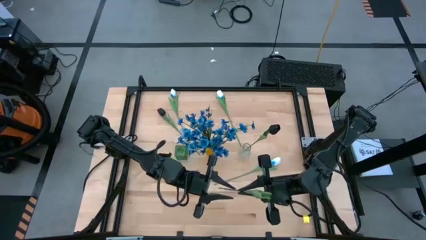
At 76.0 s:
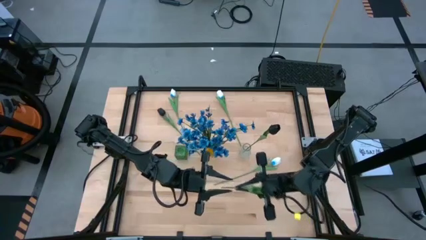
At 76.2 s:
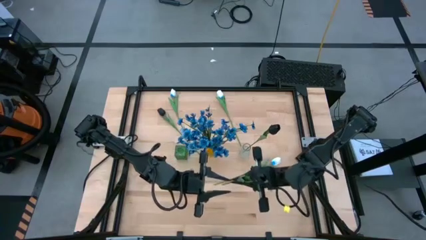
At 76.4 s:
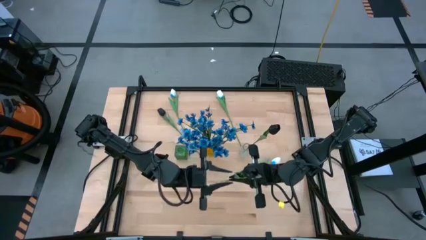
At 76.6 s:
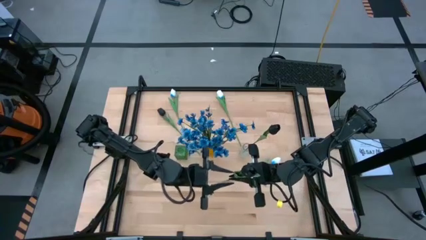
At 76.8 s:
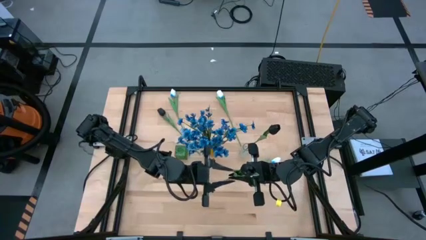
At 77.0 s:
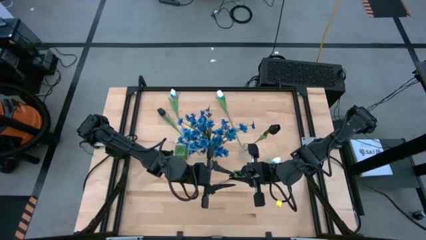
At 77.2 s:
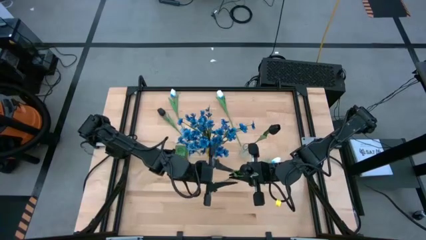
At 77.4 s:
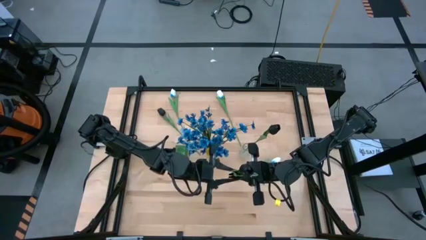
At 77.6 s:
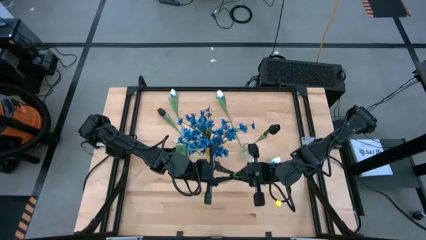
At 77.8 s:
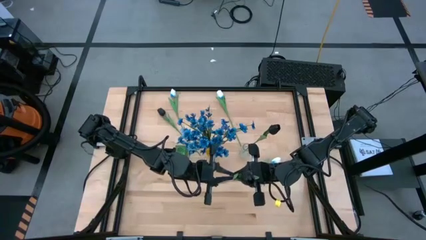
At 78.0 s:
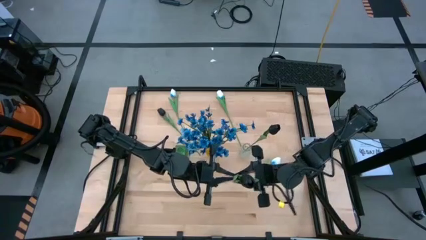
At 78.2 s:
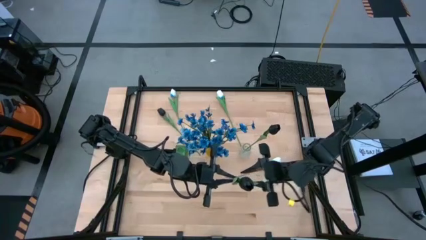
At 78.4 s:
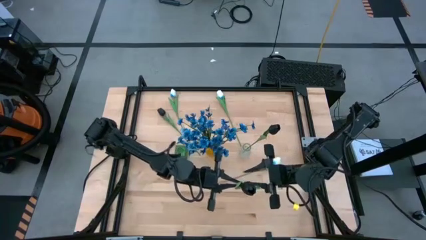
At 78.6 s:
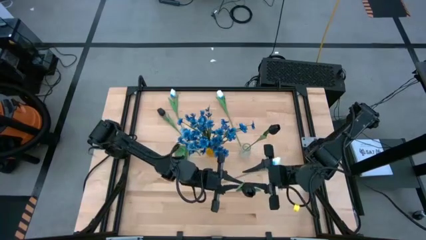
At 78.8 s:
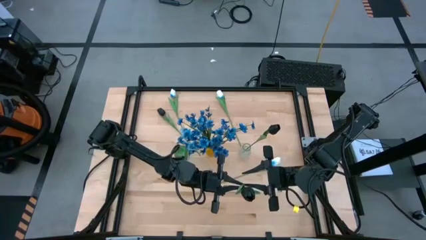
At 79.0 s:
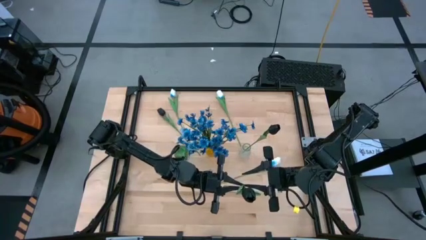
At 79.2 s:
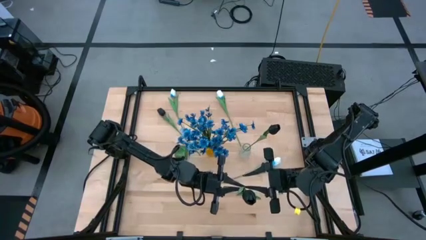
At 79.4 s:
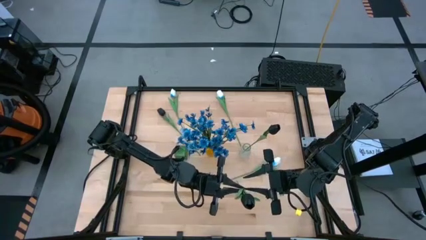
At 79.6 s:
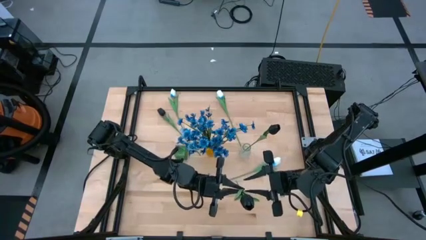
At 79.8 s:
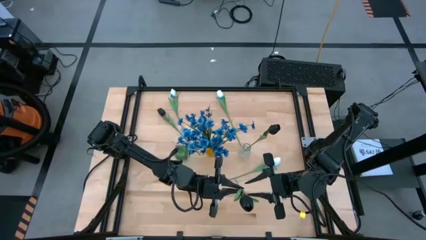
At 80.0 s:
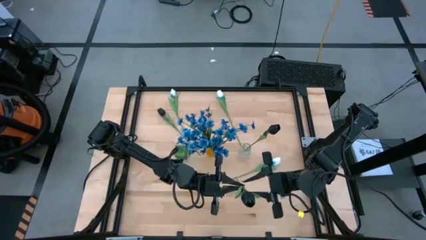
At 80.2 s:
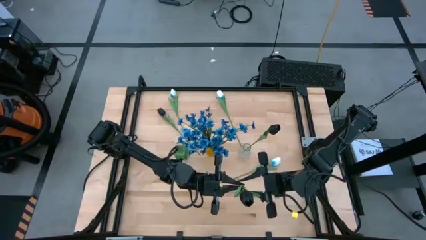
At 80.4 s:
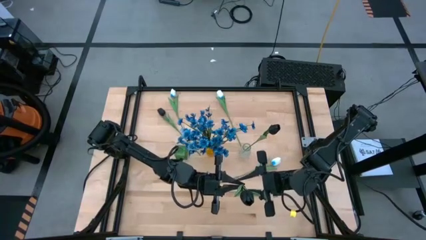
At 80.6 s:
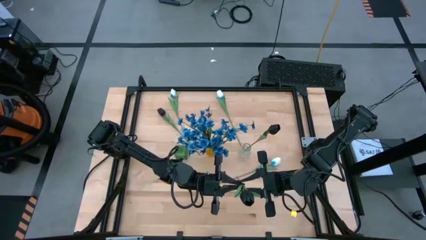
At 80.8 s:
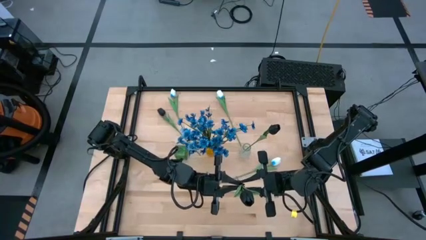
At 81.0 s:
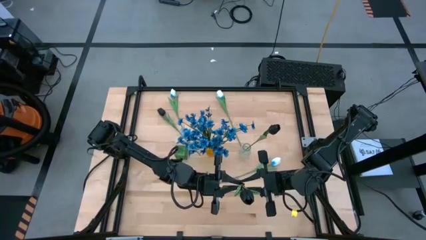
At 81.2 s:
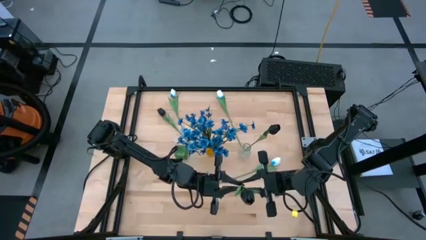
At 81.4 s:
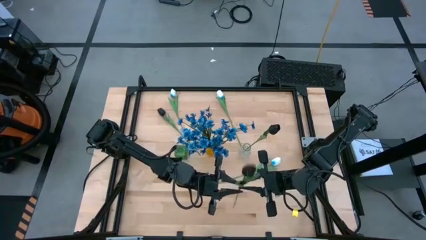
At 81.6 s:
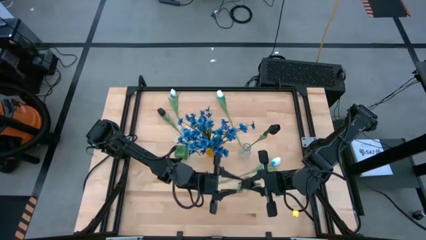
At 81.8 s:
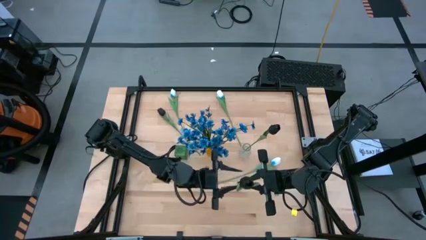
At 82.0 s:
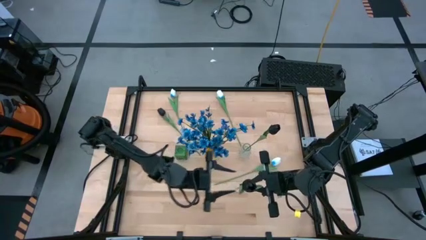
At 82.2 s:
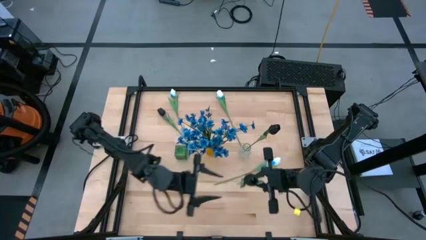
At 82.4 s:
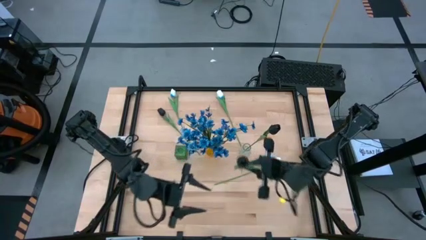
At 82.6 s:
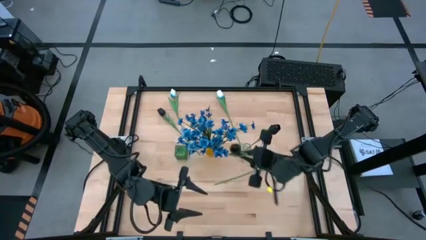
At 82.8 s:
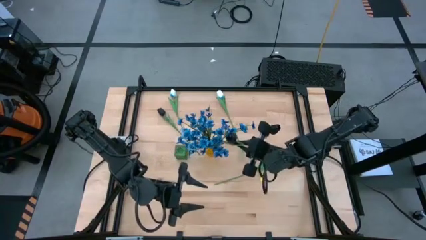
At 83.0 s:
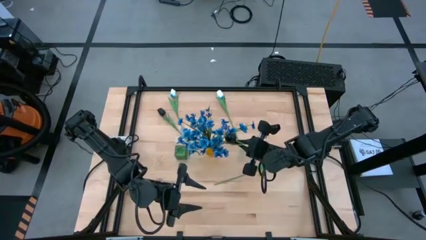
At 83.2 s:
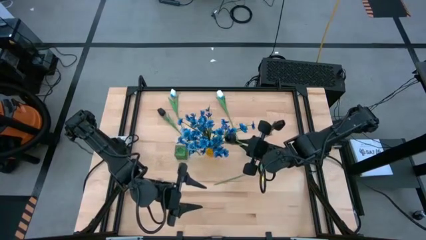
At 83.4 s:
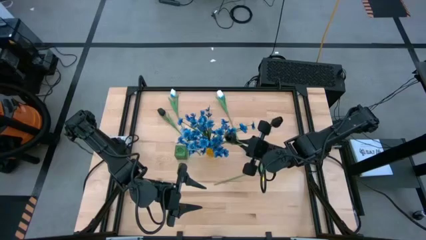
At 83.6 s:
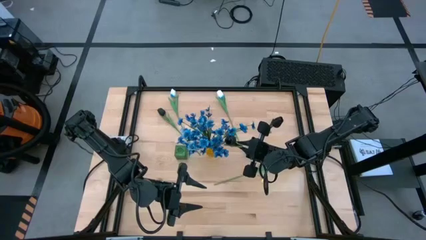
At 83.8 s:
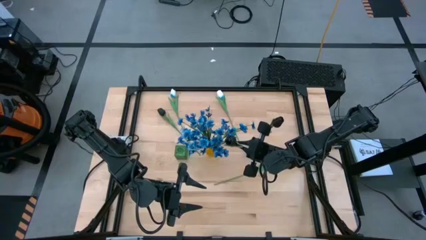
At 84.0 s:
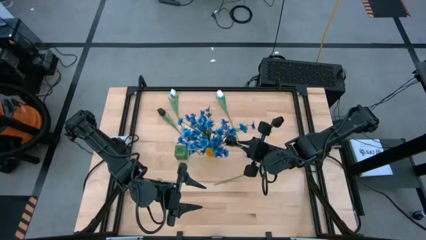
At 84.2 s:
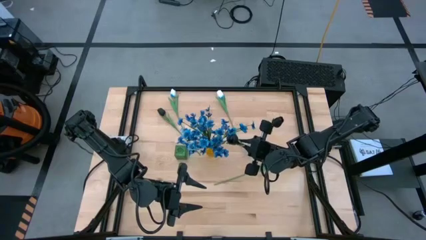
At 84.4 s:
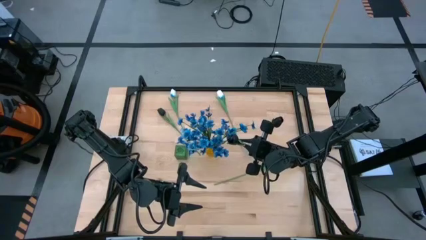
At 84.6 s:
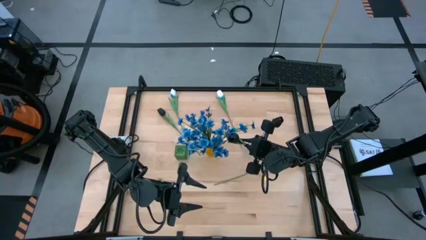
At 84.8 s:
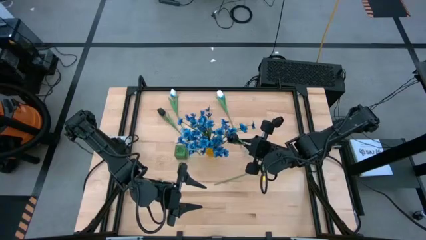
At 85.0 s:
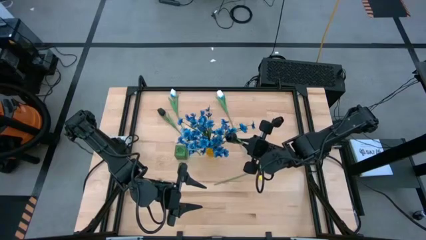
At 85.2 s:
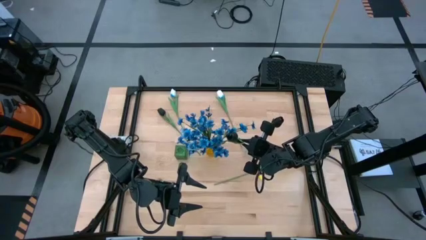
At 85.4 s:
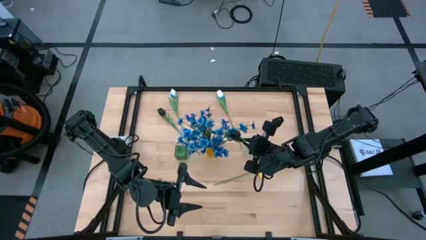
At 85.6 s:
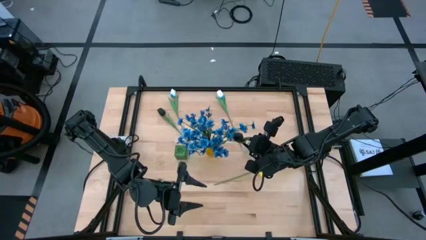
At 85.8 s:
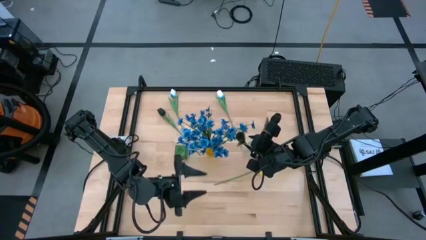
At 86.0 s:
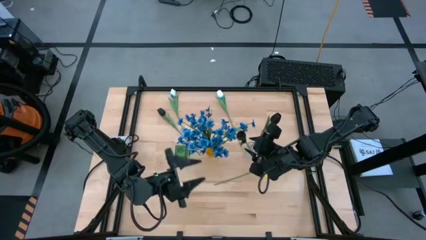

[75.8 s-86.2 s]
Task: Sort flowers into vase by color
Put the bottom black flower into the transparent vase

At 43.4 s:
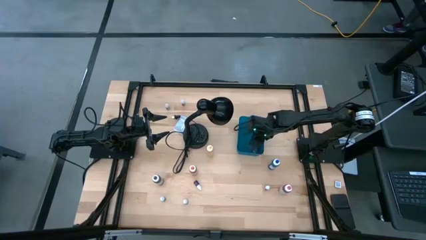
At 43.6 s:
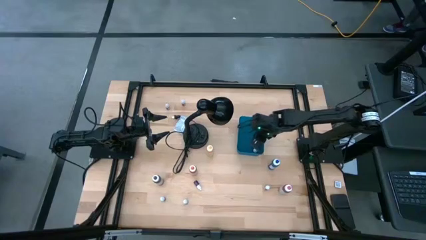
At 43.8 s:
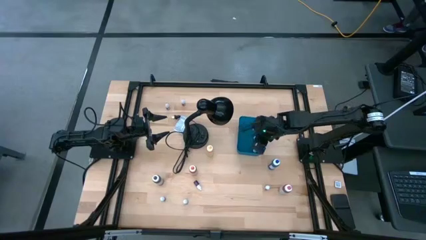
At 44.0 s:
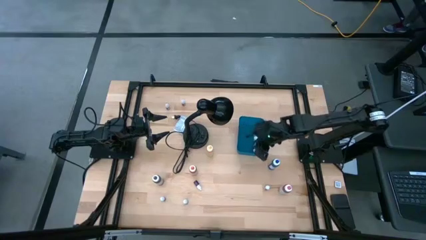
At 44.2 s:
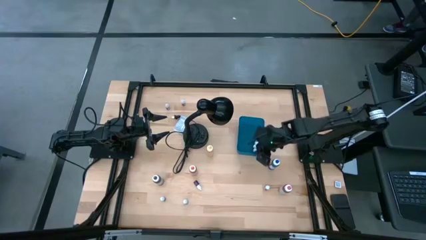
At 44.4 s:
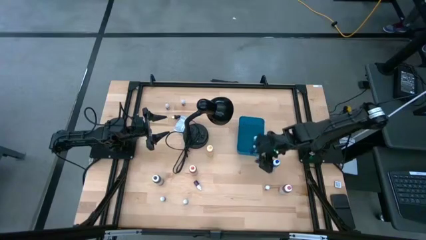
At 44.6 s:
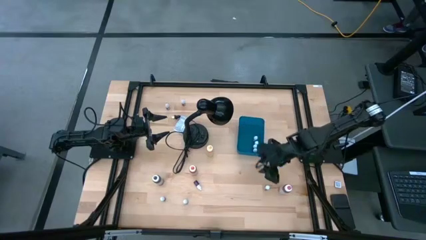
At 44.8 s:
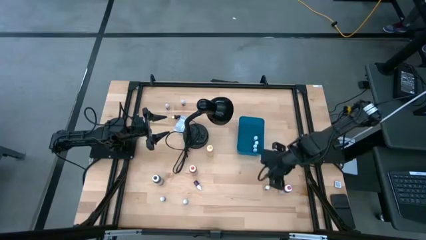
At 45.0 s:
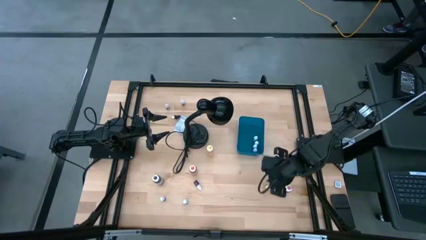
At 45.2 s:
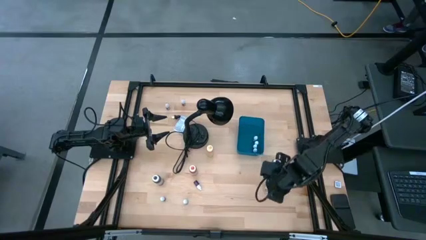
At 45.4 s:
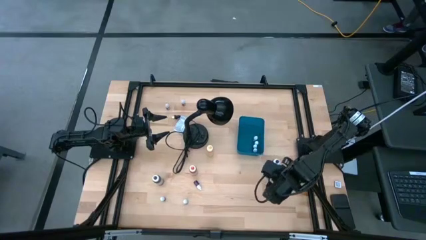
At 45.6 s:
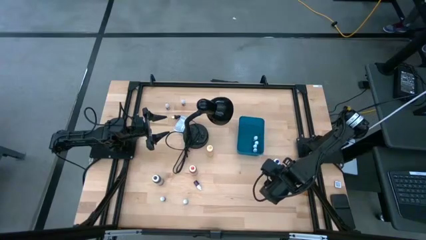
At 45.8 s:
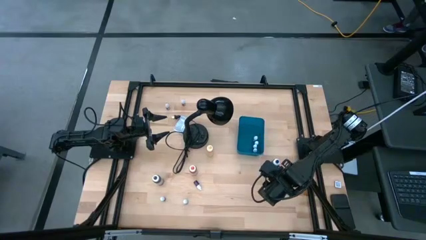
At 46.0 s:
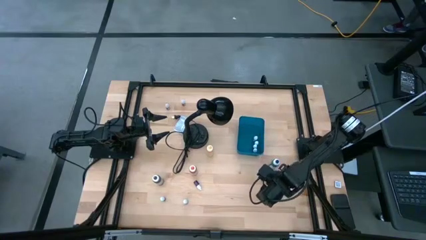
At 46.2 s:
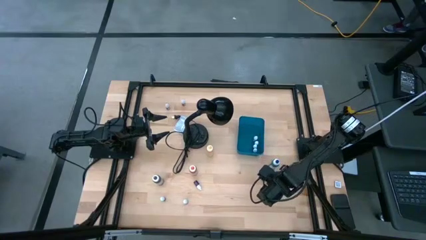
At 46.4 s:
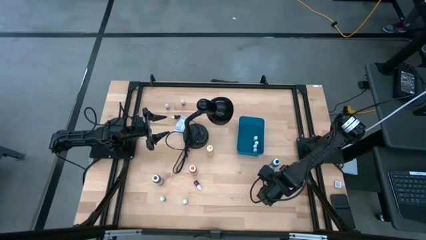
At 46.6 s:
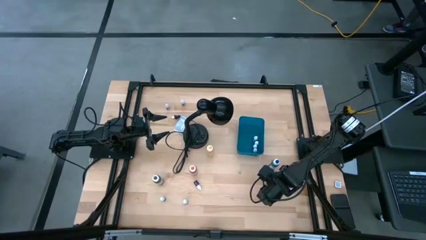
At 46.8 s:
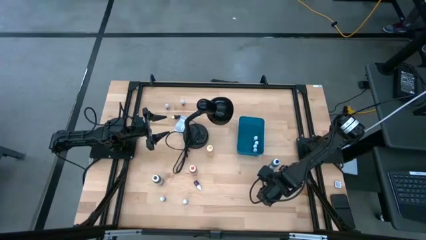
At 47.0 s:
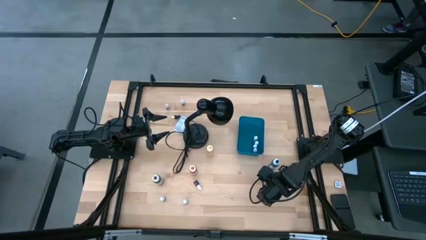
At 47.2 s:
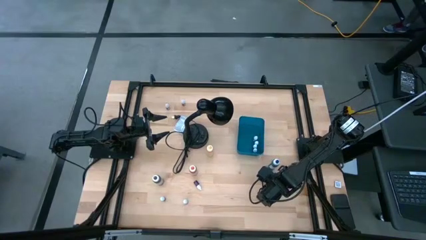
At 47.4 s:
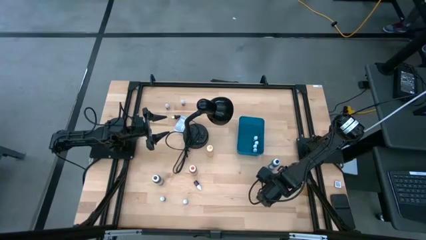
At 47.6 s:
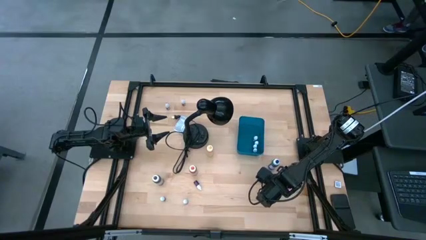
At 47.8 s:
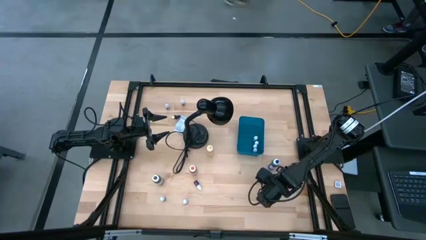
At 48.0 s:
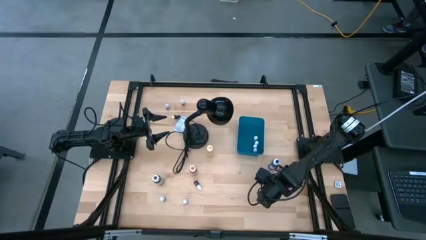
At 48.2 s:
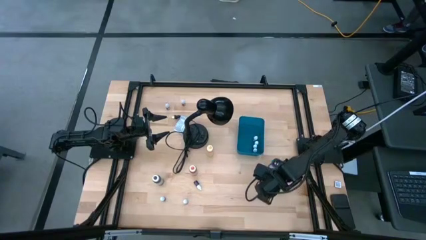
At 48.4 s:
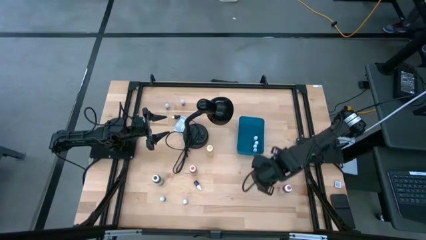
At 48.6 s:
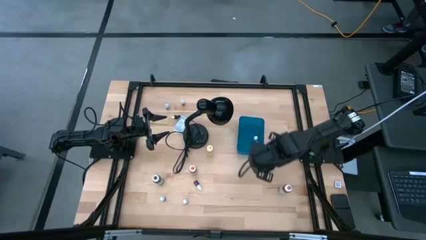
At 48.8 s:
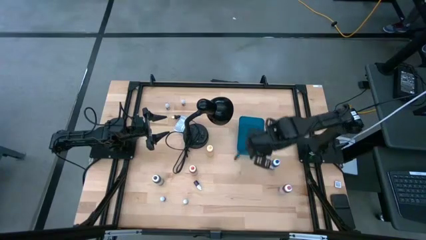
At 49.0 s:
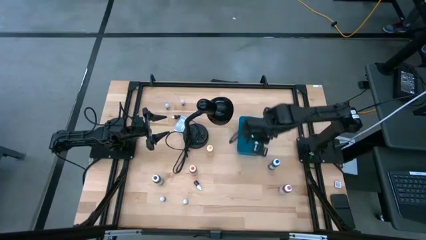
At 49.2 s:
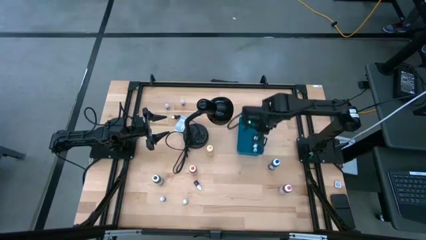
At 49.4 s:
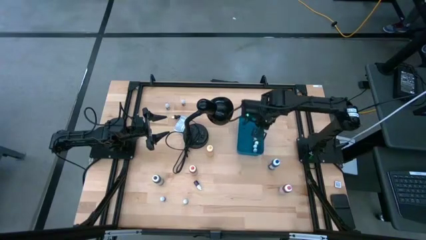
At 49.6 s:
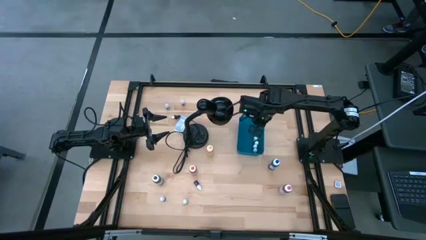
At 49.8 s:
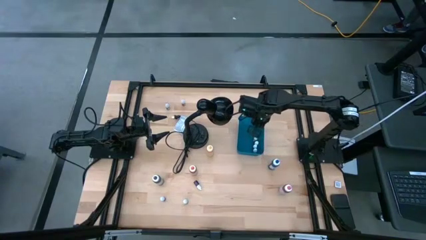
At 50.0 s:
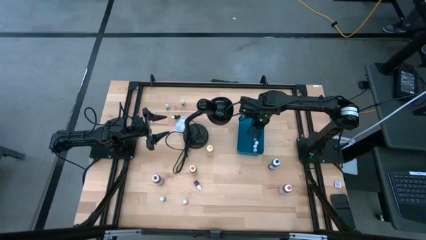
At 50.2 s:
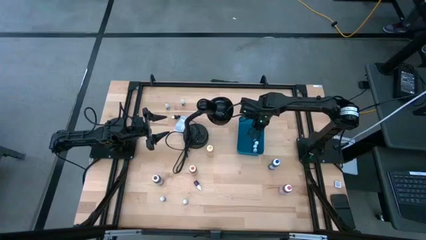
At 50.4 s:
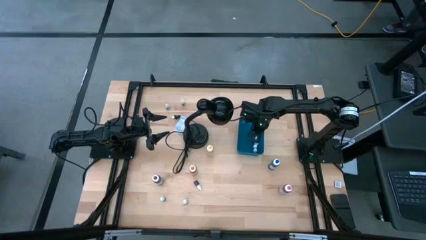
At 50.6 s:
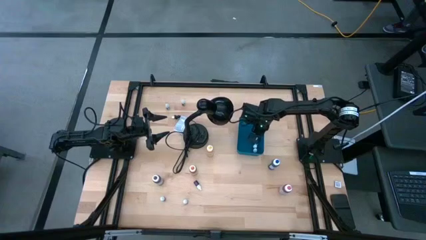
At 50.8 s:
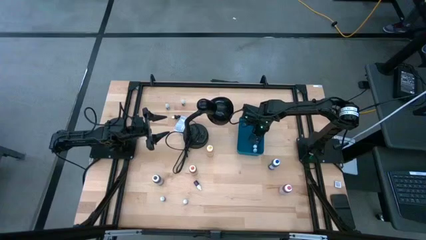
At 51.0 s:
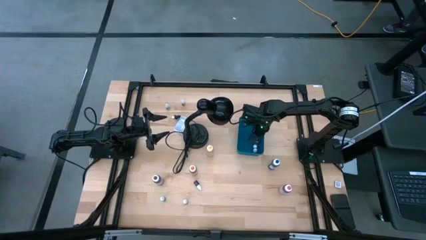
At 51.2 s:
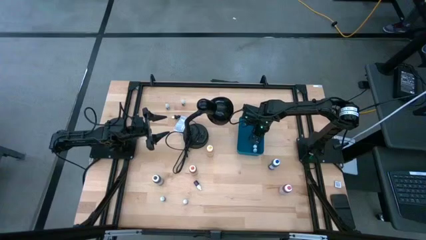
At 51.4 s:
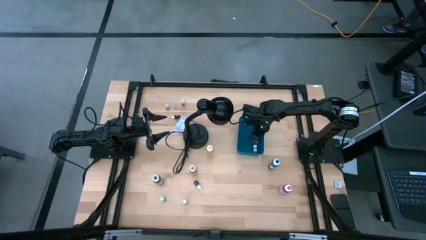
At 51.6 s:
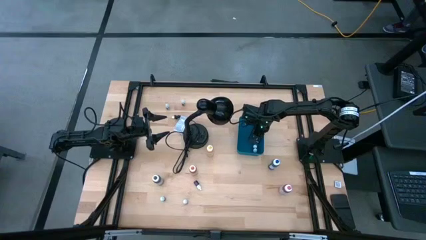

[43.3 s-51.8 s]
Task: Pick & Place food coloring
Put the small light blue food coloring bottle into the blue bin
